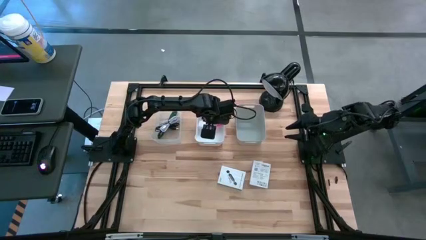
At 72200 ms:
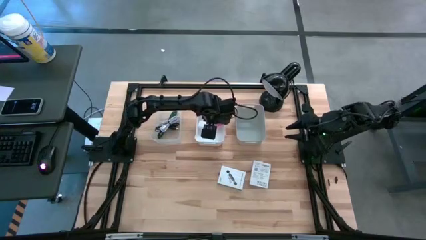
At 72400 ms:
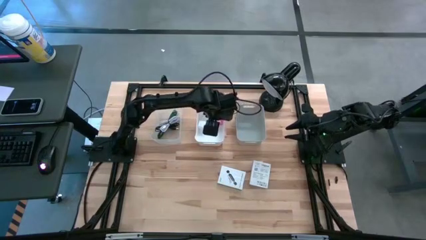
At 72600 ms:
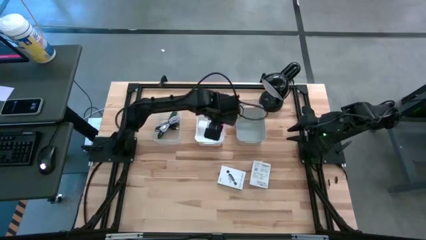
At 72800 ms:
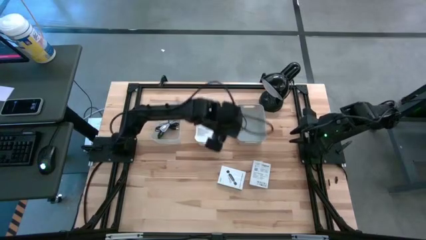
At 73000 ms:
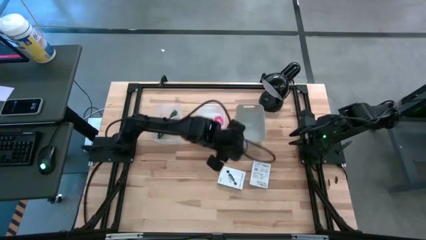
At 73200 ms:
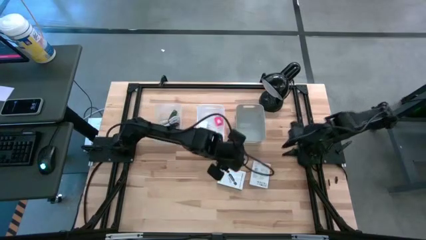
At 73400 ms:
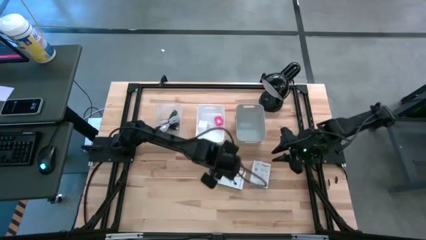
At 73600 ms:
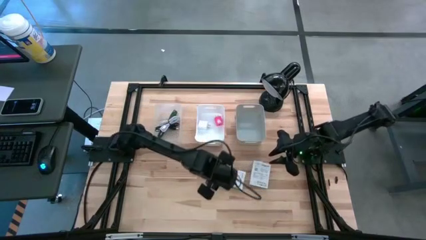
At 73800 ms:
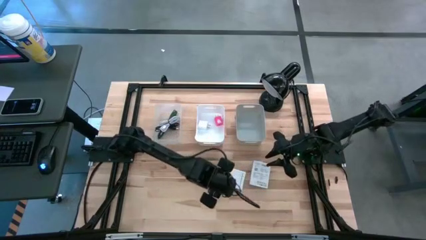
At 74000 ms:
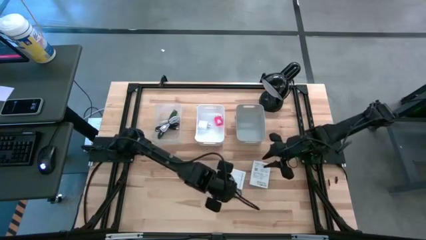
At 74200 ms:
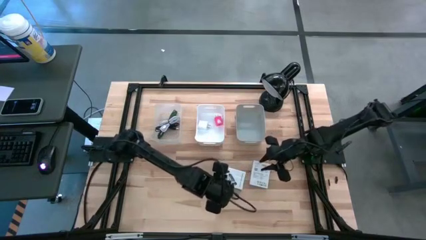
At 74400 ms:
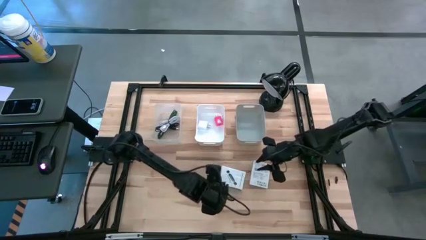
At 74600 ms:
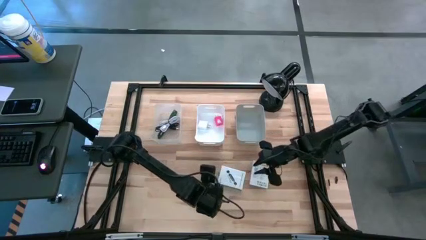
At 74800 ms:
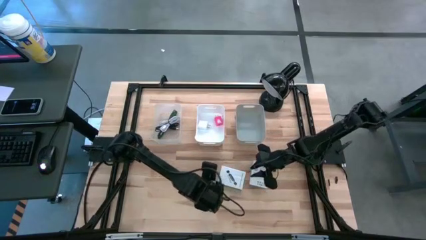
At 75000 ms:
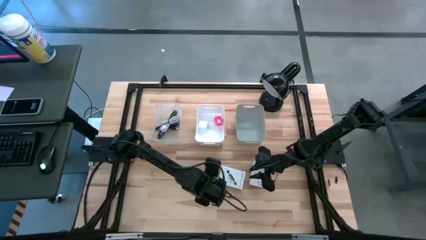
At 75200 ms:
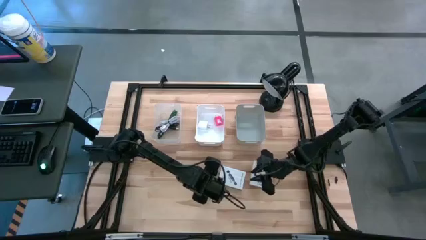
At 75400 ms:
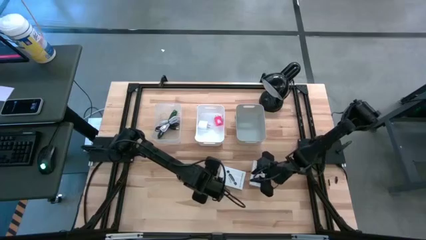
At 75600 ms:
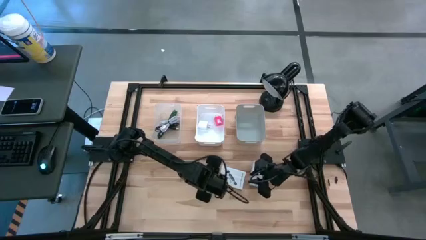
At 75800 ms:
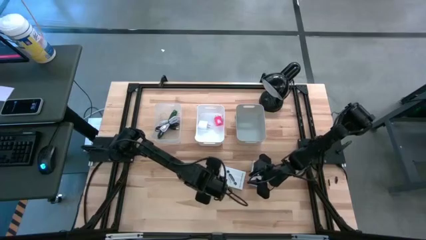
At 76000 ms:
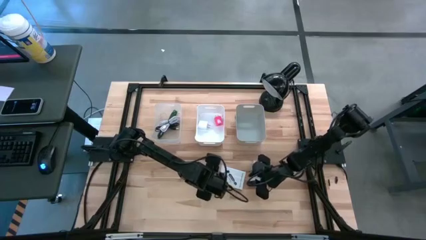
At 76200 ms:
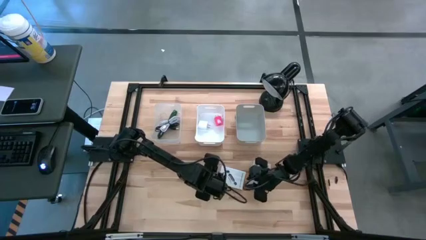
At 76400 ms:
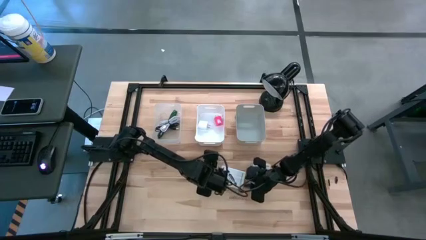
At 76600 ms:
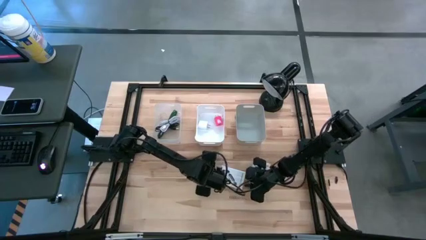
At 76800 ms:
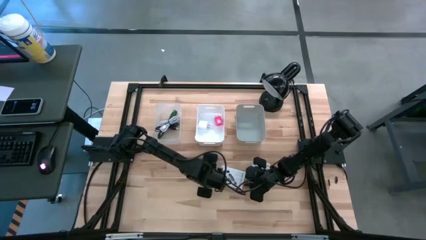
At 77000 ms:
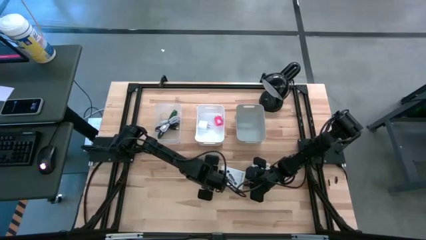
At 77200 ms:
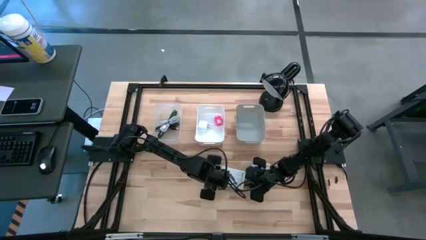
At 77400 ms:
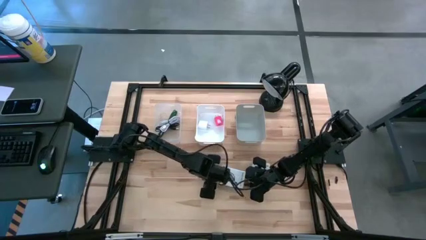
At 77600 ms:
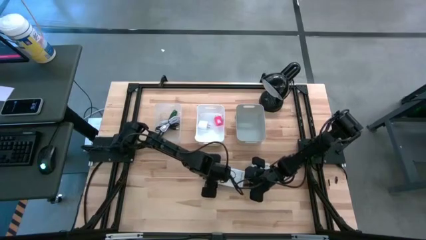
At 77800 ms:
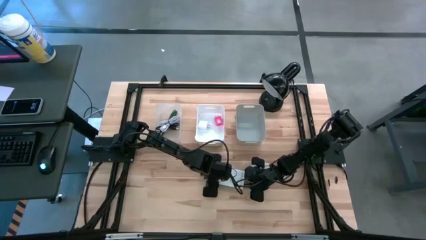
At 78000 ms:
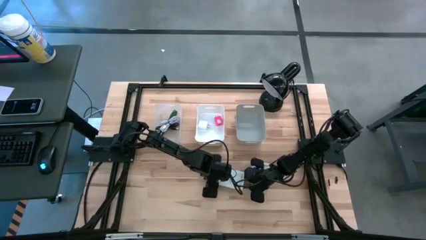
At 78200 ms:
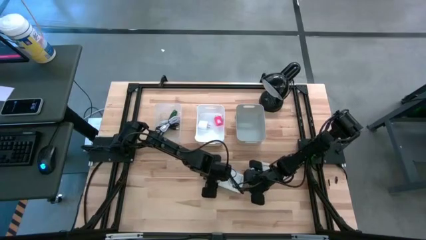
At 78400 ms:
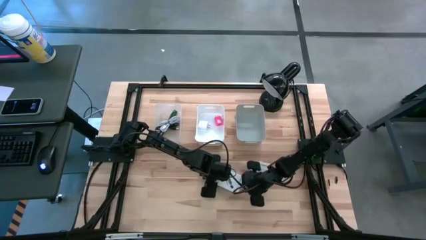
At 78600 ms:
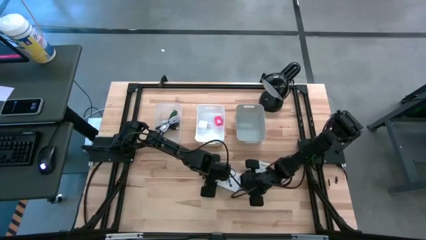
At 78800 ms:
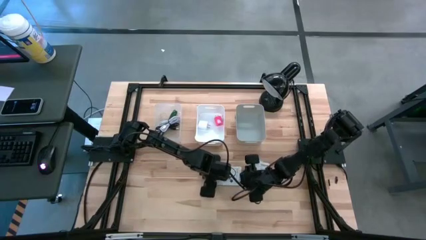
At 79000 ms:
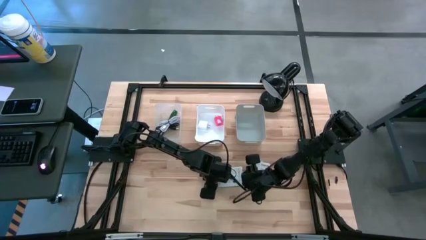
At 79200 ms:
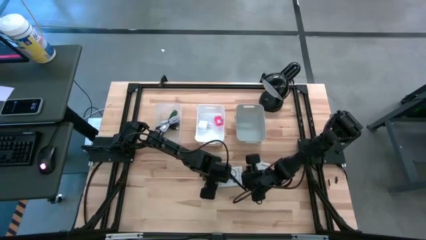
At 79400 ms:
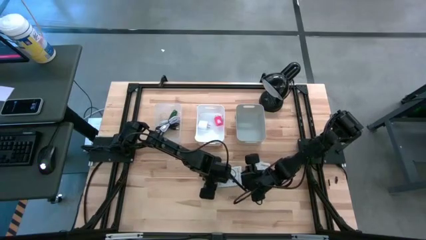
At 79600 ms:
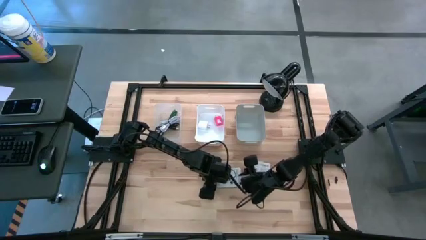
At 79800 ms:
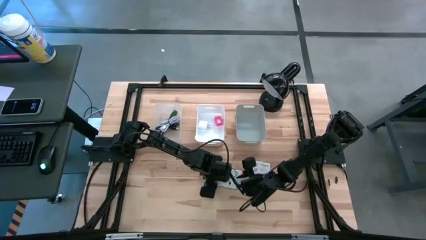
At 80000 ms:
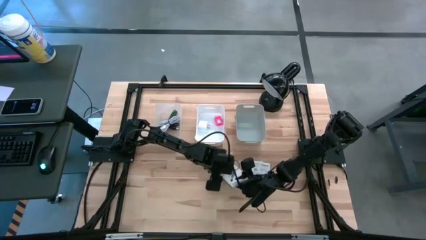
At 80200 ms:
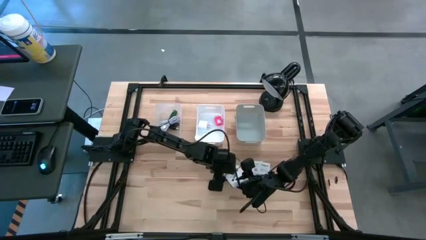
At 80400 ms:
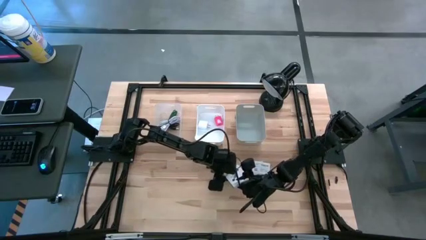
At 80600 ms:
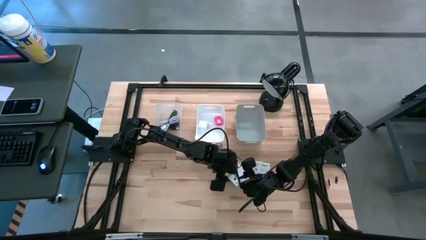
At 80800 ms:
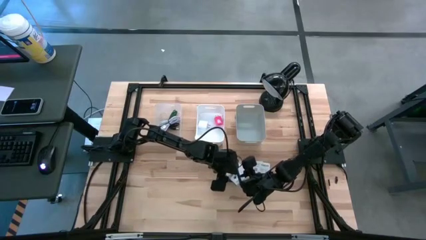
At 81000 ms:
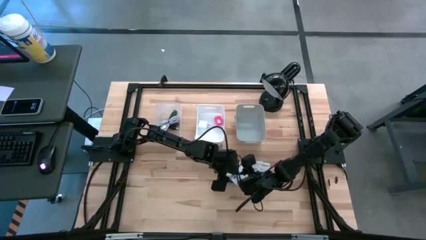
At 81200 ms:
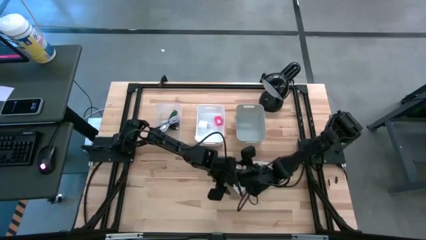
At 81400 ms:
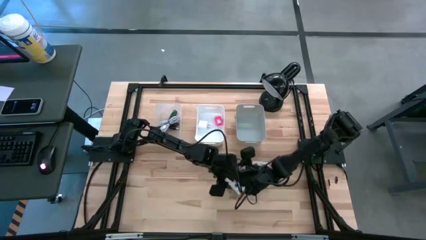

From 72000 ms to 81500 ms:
Task: Pick and place items into bin
Put the left card reader into the gray bin
